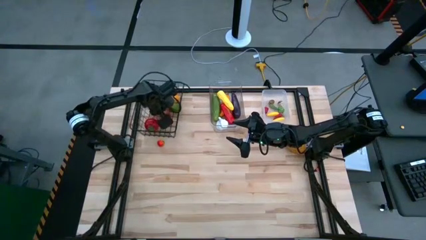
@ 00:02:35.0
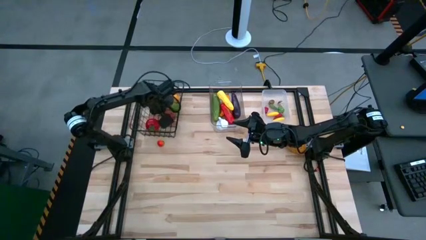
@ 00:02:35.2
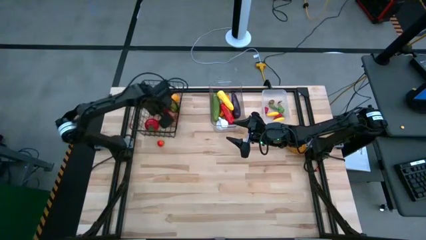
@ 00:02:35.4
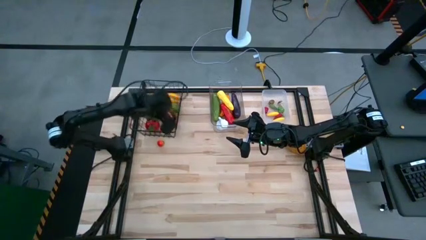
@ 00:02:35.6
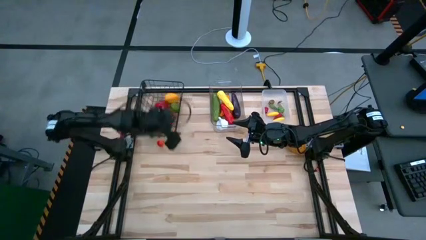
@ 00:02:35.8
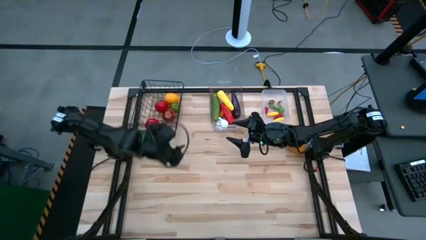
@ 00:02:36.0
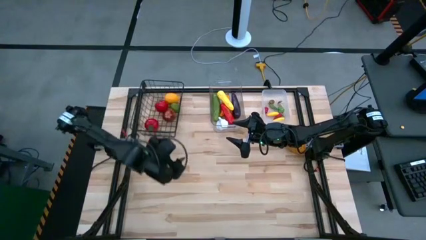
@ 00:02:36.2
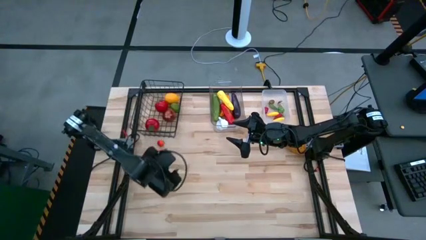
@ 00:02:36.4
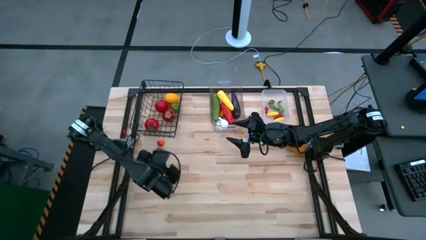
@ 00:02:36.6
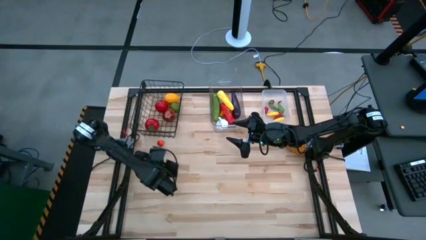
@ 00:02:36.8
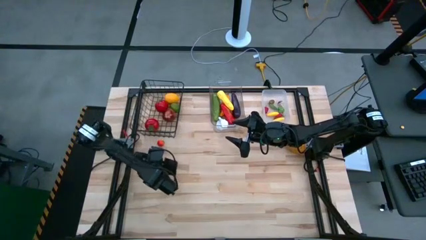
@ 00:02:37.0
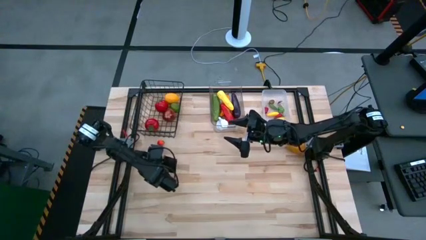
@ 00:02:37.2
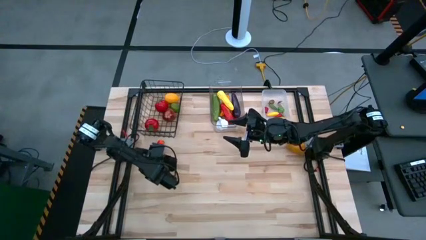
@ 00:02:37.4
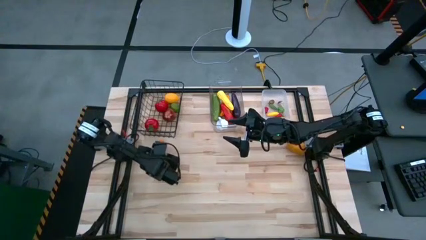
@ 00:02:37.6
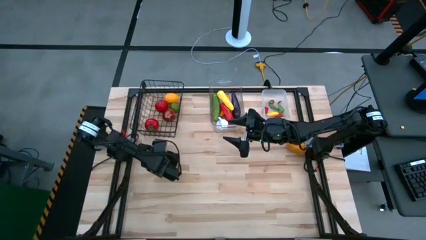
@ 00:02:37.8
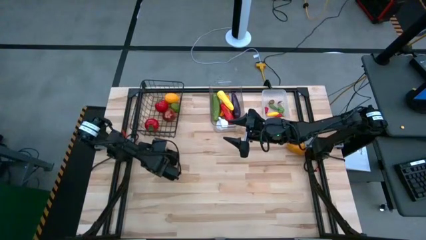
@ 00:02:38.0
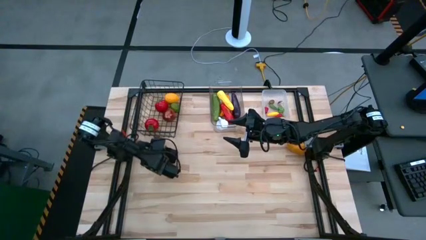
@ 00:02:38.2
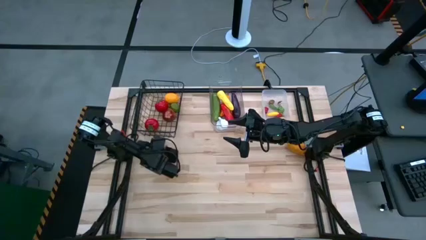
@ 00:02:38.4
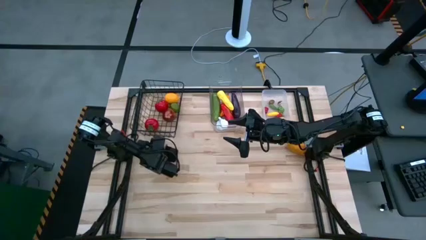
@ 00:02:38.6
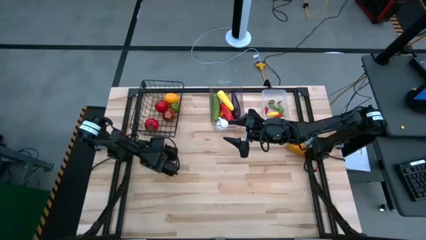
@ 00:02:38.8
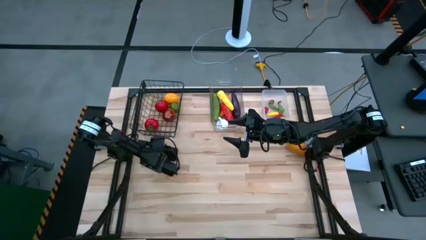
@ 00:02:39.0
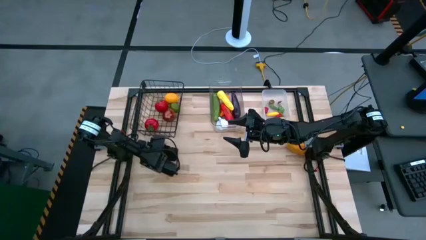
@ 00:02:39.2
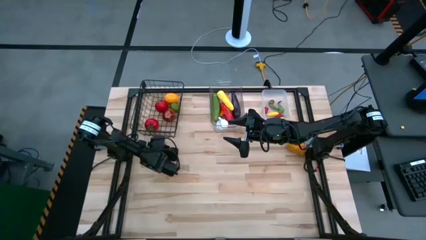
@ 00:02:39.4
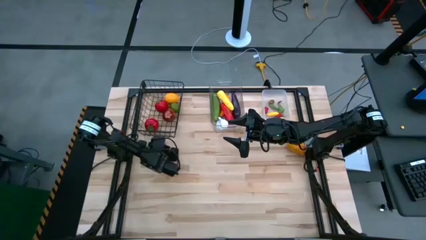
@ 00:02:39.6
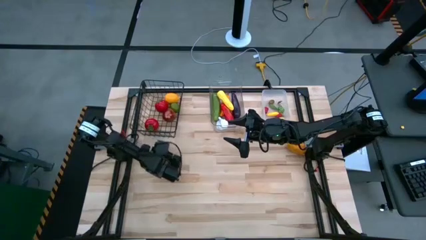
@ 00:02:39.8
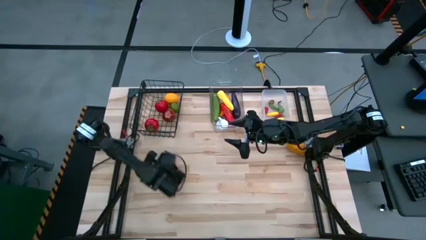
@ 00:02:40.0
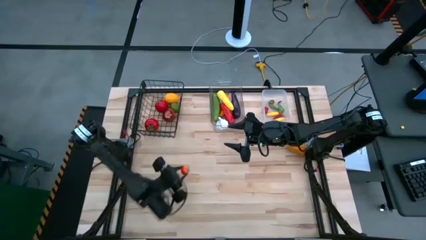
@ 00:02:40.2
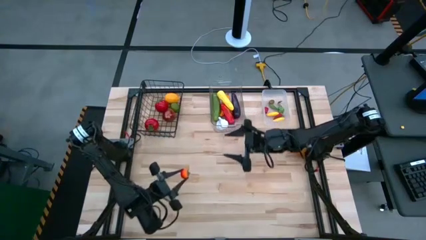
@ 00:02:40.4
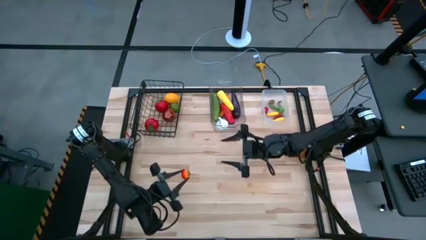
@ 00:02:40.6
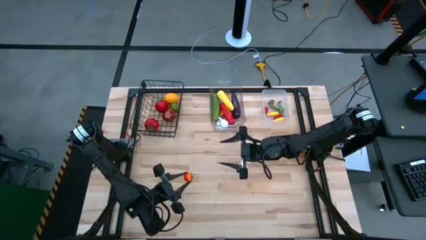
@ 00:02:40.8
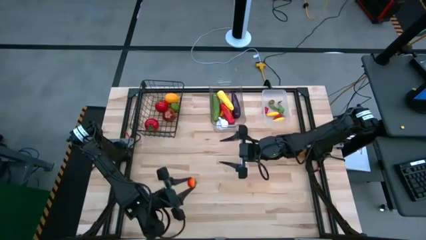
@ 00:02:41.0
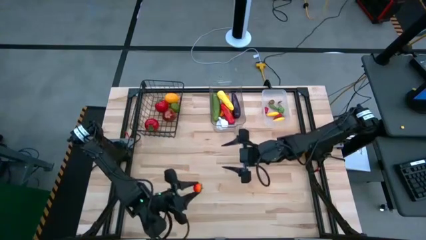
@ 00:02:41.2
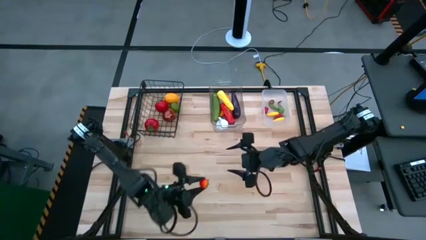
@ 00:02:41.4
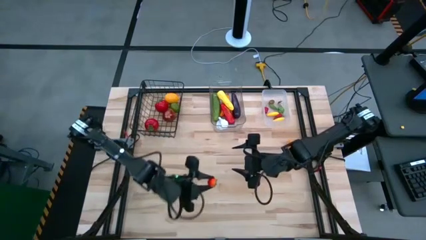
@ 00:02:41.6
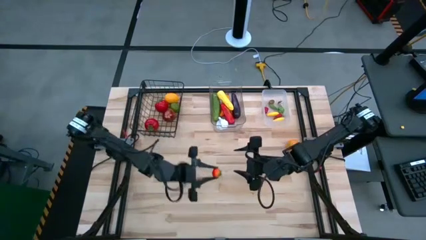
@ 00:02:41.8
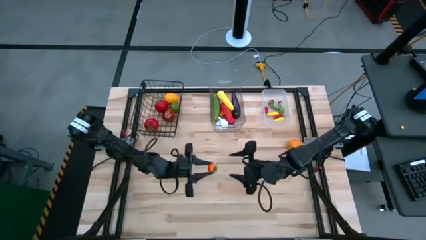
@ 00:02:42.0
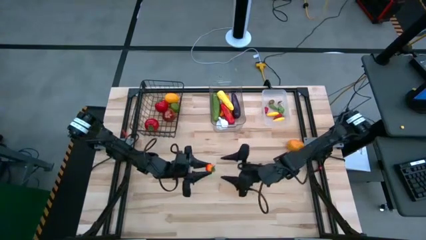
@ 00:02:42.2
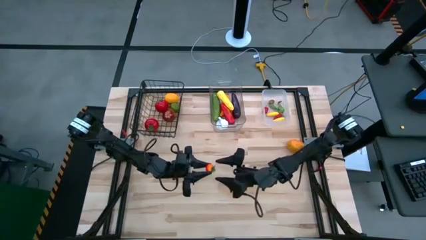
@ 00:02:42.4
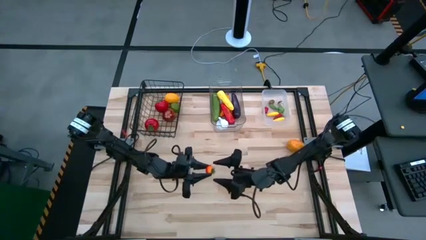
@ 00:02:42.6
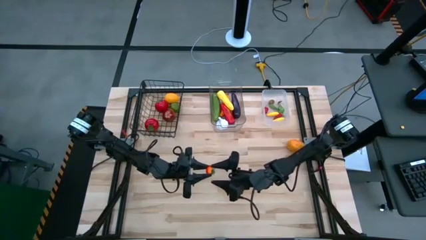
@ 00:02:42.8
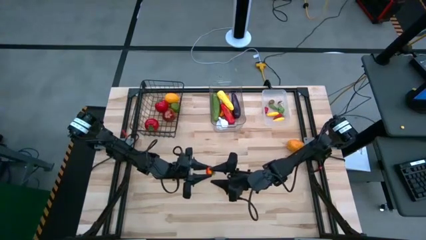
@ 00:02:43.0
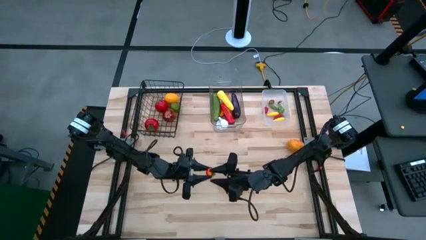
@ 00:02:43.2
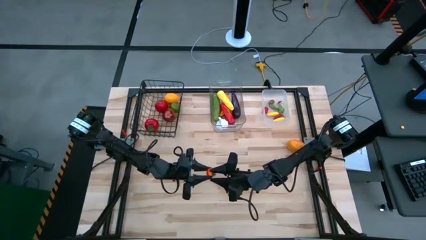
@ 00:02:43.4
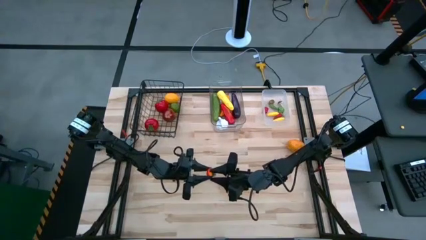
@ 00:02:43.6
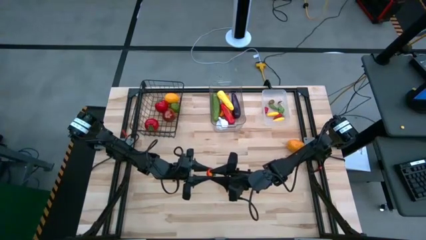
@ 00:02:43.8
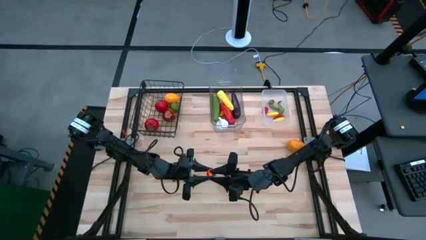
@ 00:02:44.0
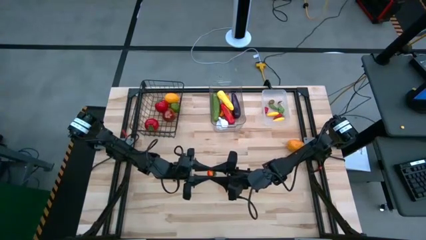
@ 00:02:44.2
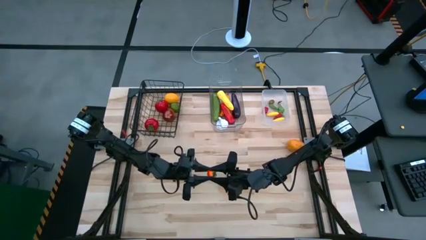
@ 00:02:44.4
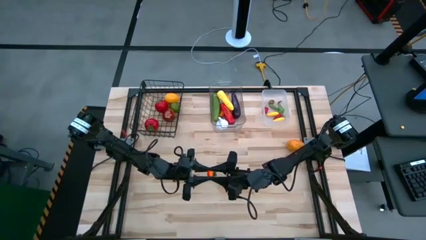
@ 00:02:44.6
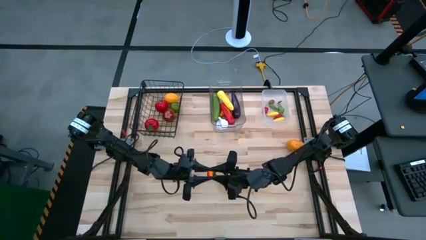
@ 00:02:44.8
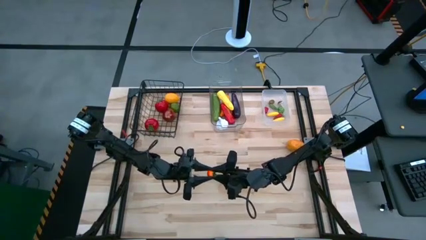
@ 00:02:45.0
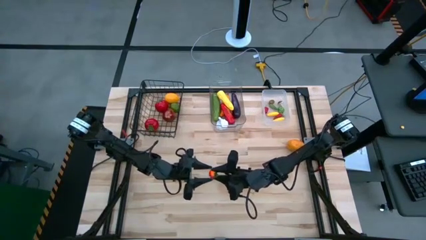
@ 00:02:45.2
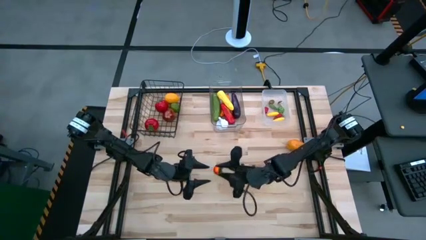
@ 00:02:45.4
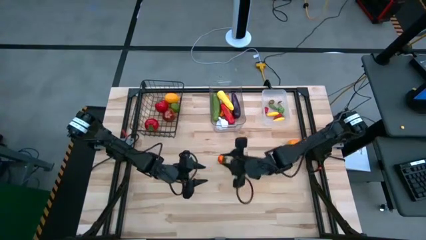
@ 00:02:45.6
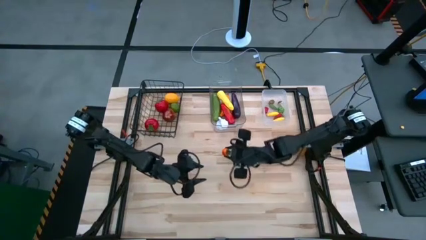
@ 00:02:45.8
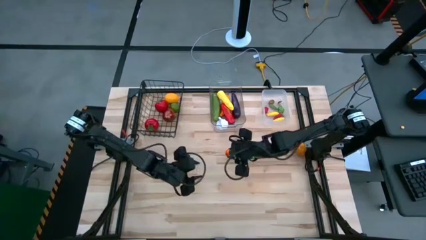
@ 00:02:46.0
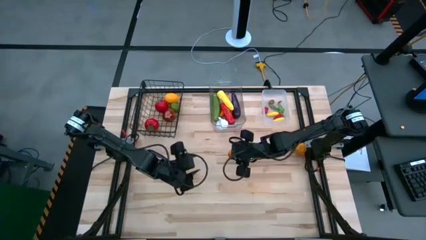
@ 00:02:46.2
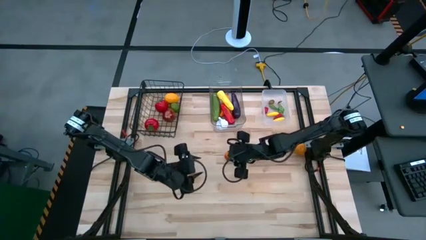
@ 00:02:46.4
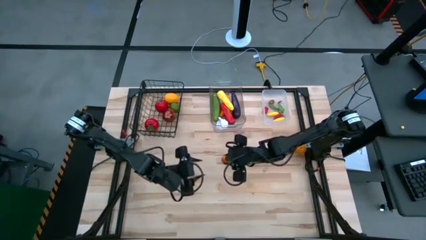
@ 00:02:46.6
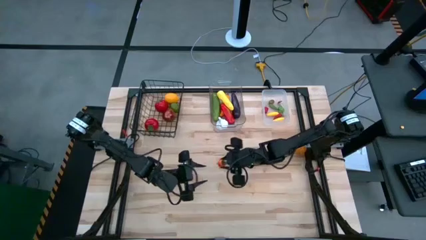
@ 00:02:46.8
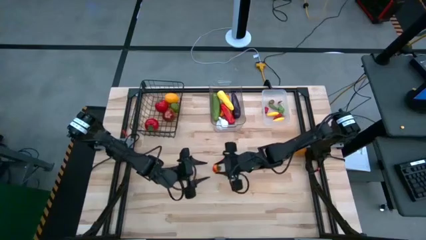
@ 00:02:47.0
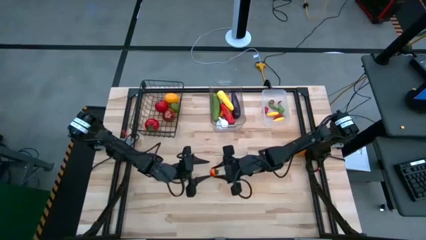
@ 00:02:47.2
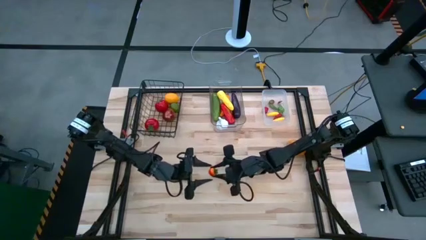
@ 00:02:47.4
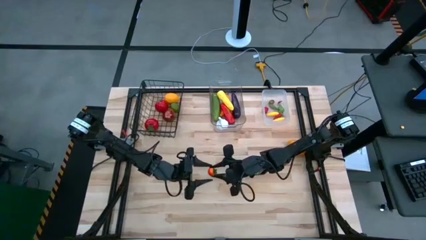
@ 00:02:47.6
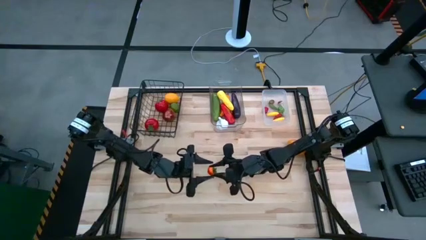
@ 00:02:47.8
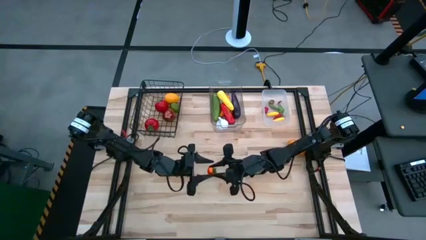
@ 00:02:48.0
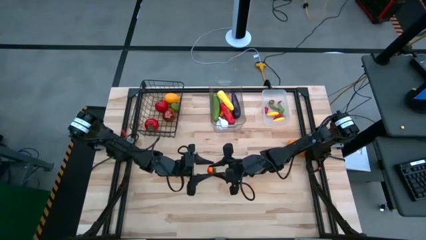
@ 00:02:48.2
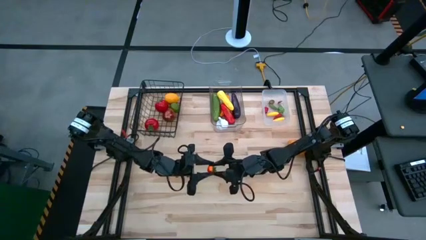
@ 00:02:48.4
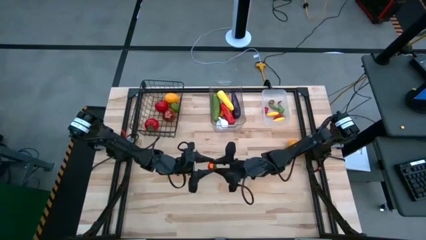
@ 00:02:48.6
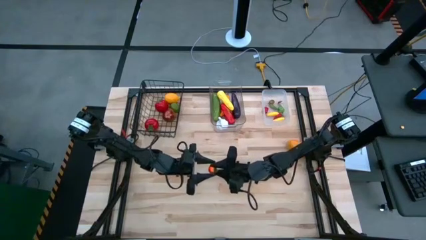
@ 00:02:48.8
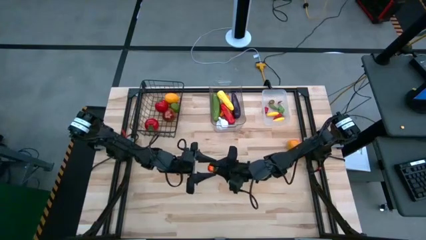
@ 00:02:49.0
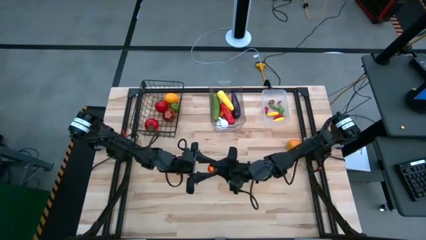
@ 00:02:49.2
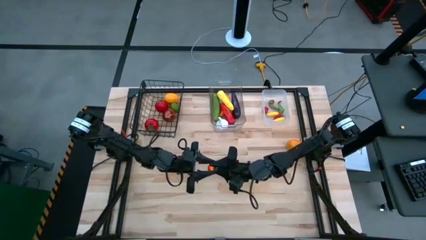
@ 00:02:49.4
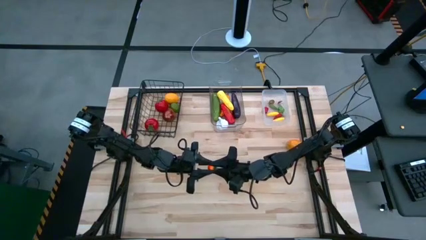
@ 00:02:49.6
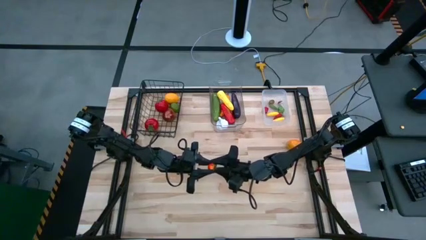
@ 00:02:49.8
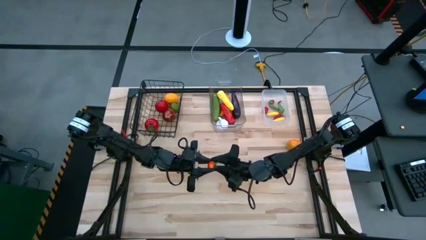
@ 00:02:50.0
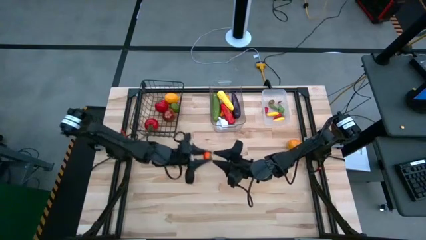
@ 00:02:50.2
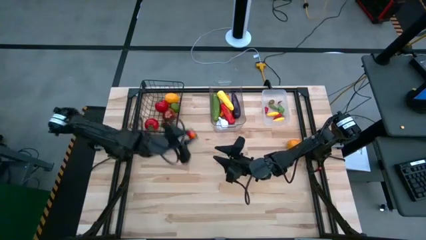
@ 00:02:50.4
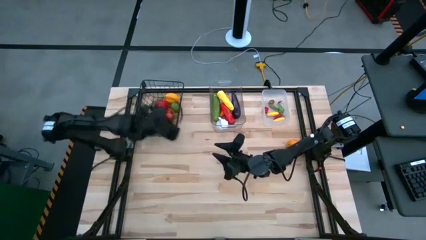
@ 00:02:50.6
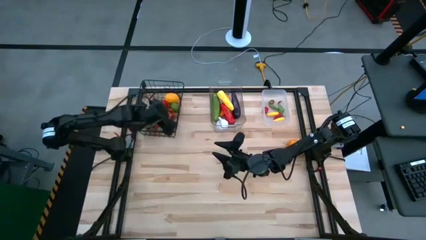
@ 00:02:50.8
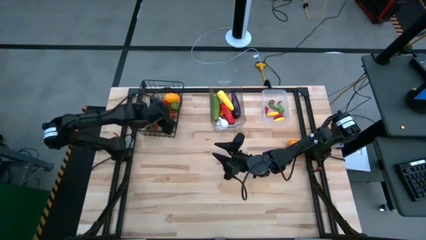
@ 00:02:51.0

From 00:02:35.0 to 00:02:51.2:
Task: Sort produce into baskets
Put the orange tomato into the black wire basket
